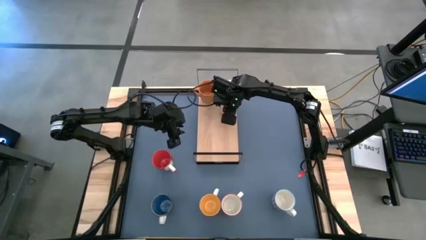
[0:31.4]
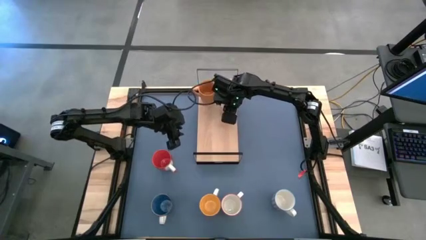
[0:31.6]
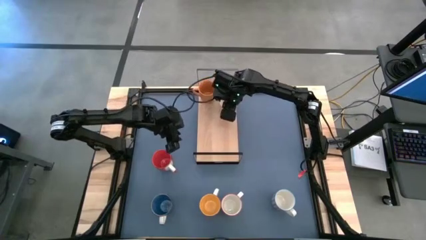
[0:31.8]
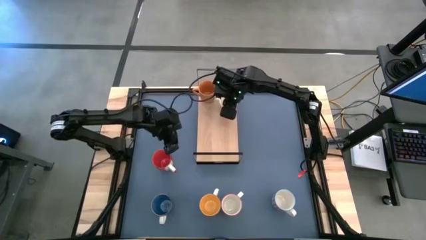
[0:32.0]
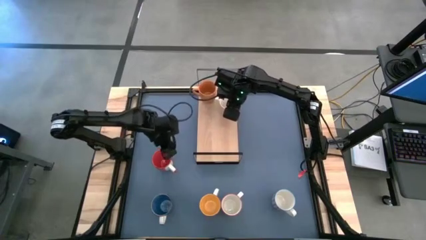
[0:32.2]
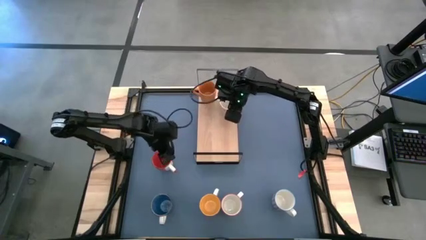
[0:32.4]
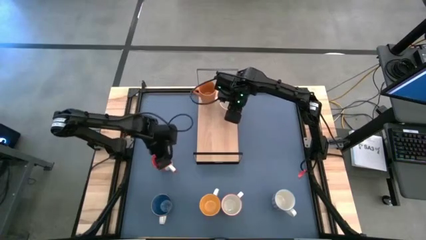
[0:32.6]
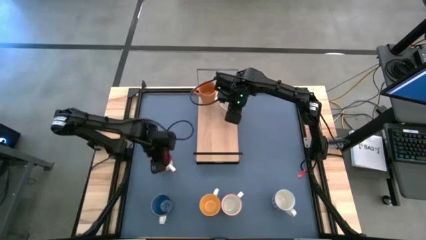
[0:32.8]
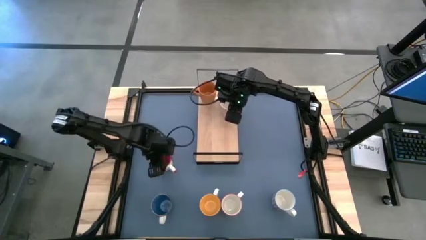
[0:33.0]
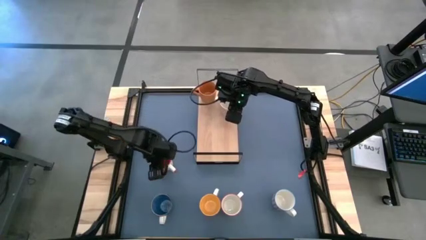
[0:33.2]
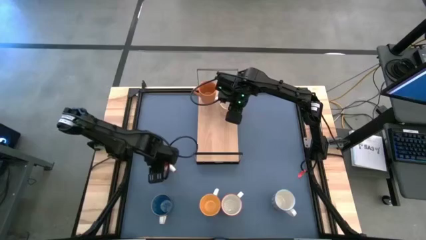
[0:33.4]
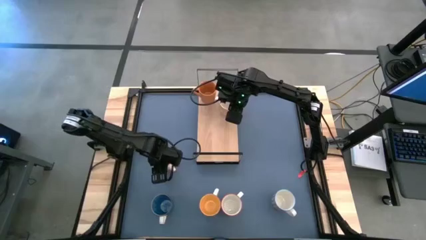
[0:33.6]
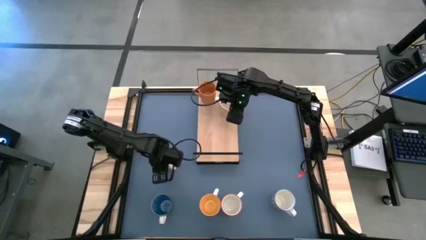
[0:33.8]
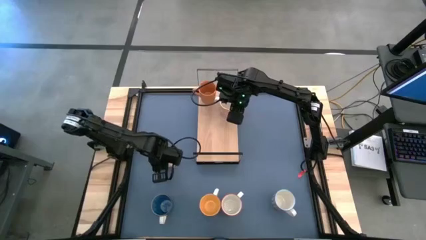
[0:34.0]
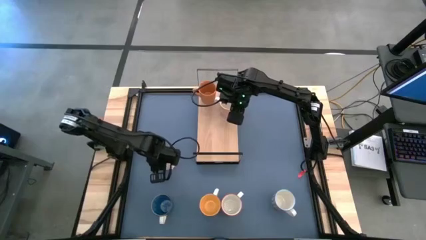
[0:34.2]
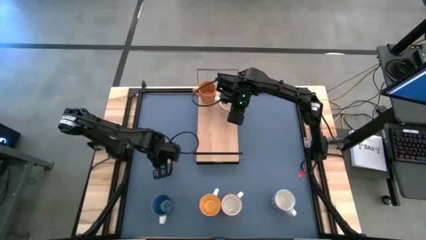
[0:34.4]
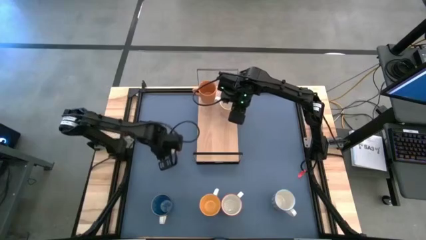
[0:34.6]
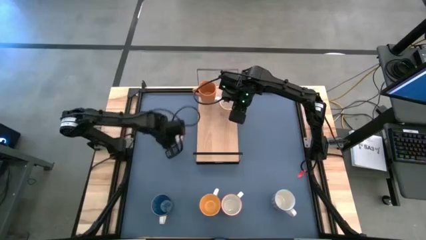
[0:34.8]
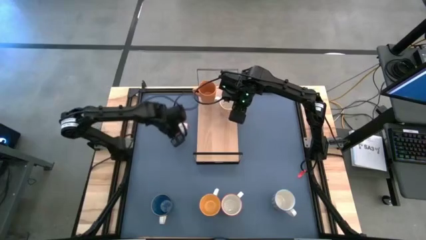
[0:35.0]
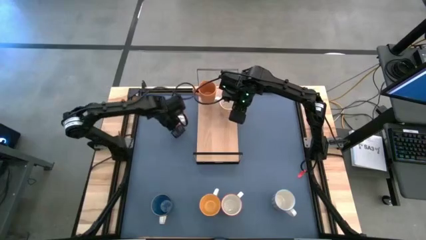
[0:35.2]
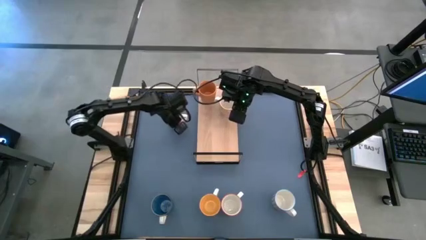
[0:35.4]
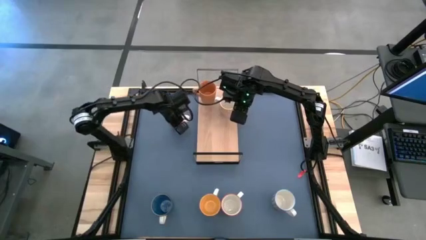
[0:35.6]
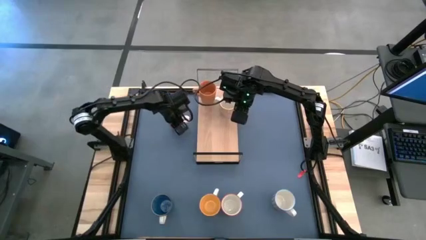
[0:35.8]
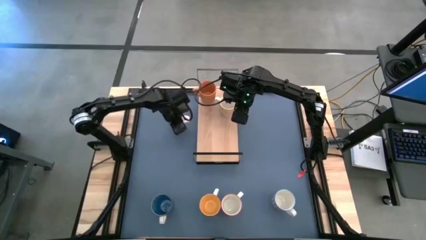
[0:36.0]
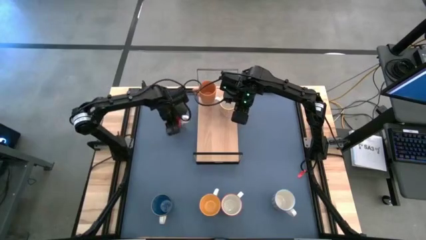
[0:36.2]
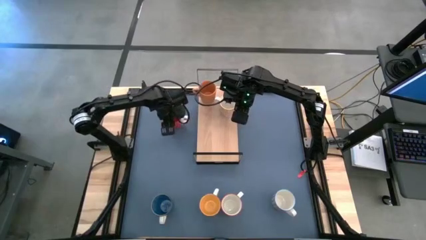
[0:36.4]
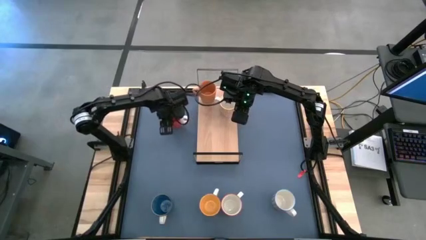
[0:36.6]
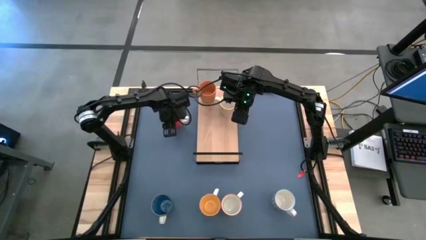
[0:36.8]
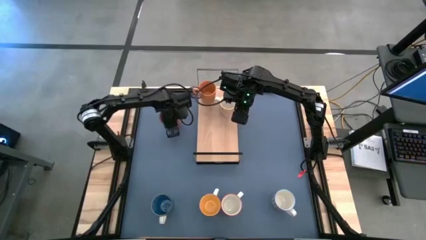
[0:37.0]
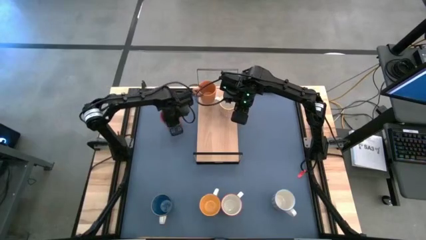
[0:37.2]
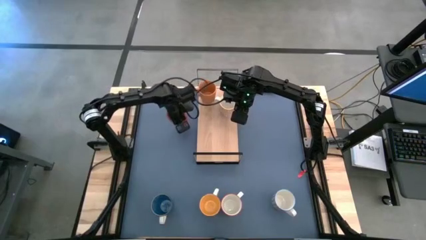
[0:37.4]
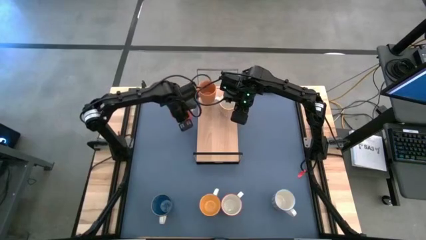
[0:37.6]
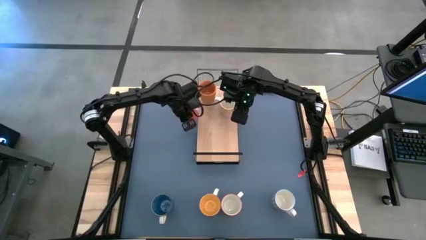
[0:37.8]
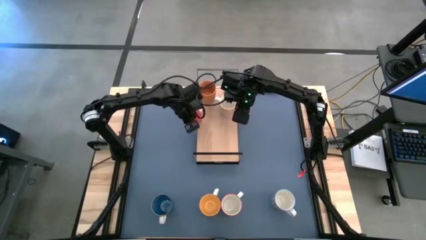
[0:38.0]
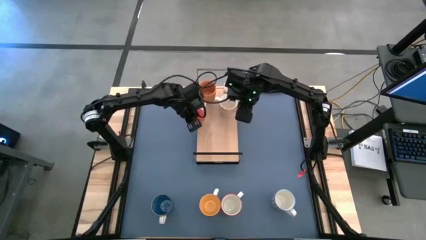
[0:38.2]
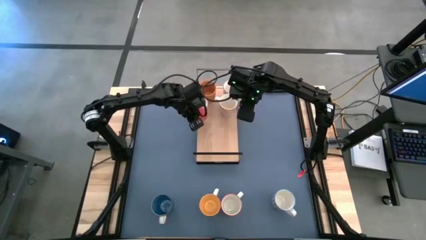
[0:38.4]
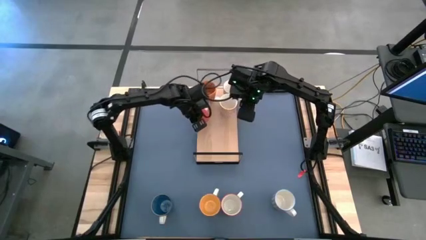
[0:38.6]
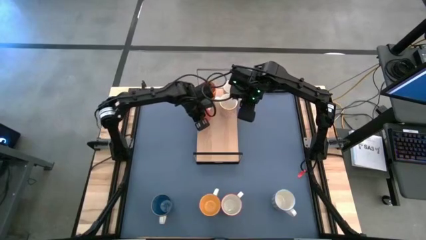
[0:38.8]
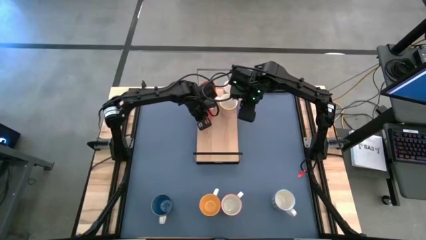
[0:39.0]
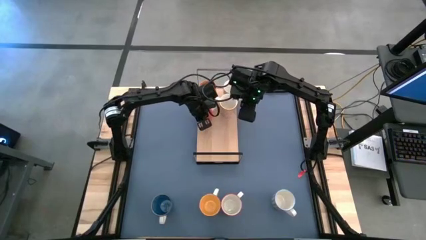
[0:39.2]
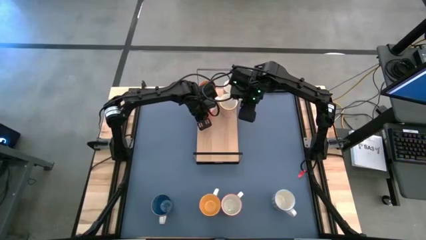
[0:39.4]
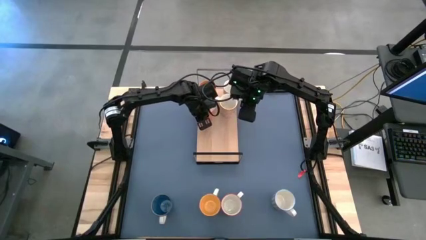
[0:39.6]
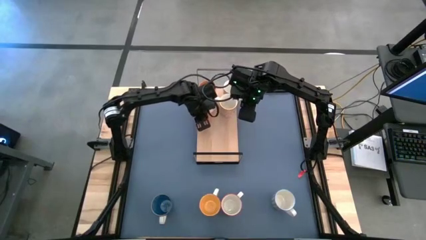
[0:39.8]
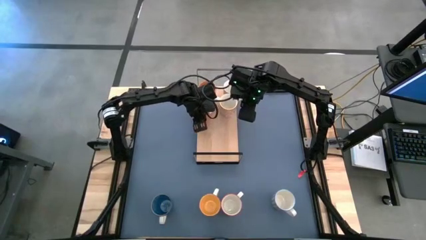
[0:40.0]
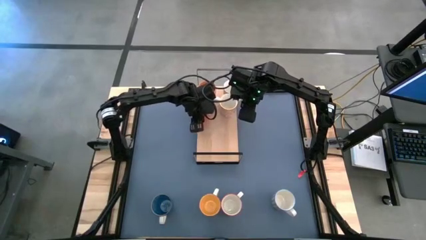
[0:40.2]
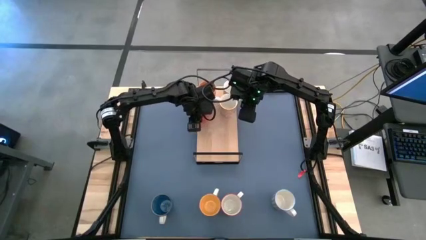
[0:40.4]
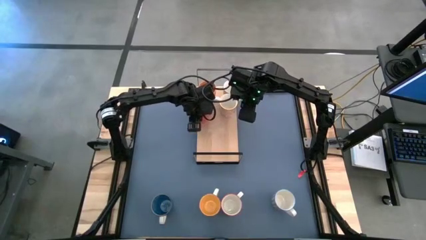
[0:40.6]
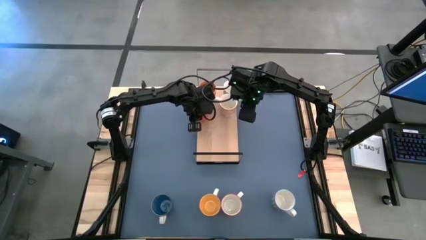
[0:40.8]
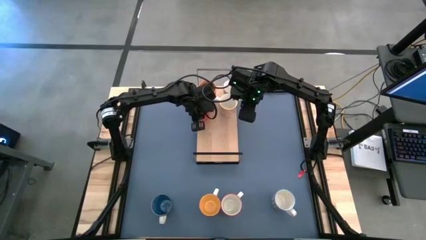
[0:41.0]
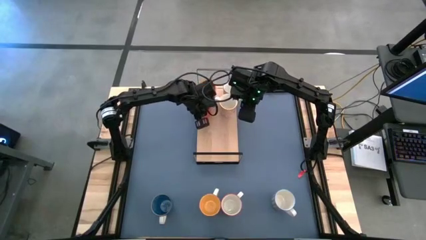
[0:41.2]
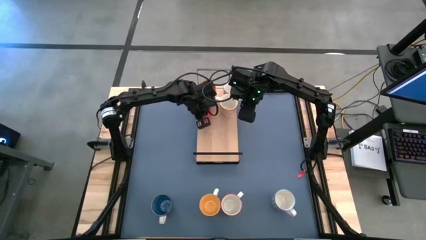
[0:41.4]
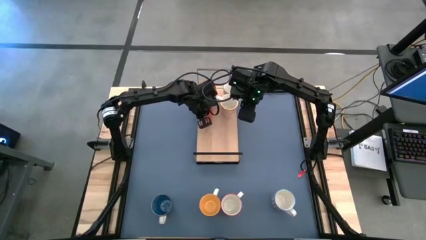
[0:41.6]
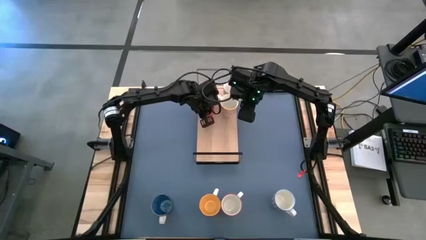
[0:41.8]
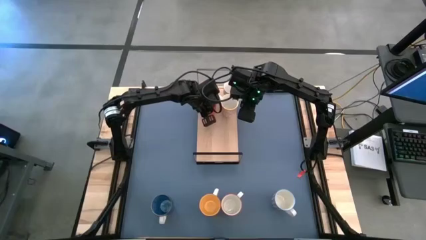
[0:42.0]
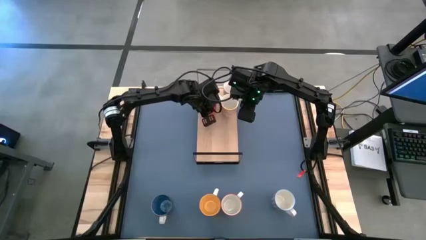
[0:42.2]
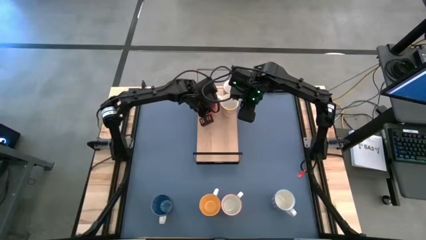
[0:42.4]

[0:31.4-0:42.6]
Task: Place coffee mugs
Put the red mug on the shelf

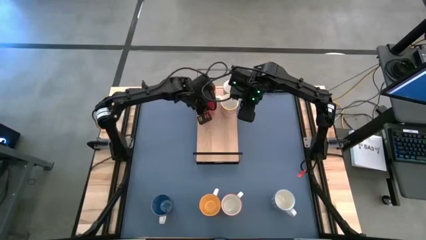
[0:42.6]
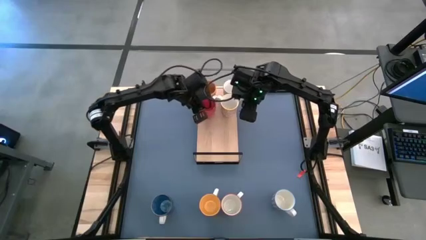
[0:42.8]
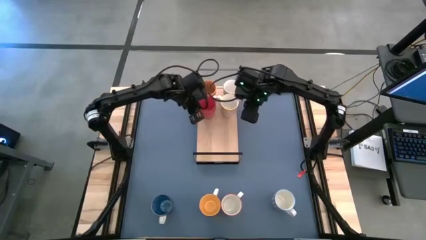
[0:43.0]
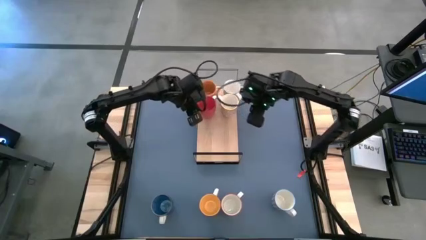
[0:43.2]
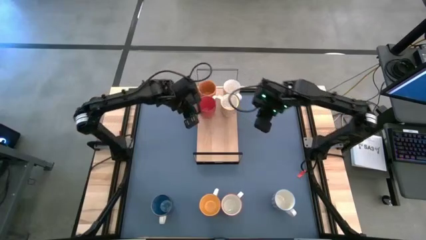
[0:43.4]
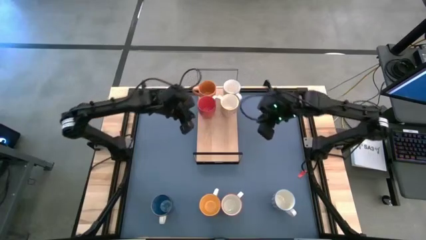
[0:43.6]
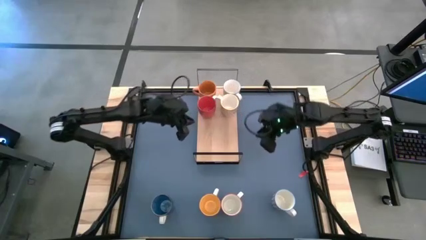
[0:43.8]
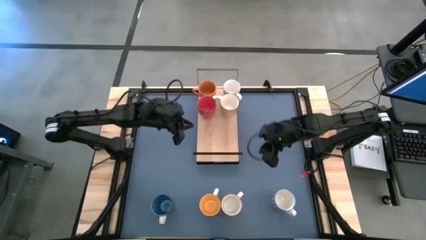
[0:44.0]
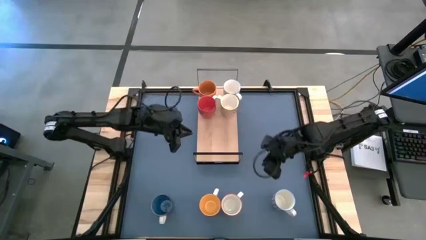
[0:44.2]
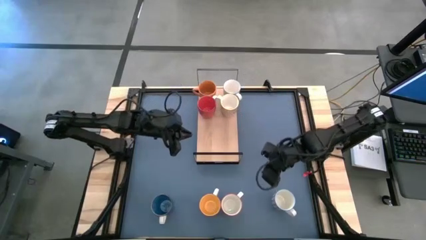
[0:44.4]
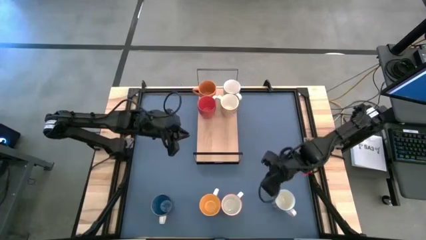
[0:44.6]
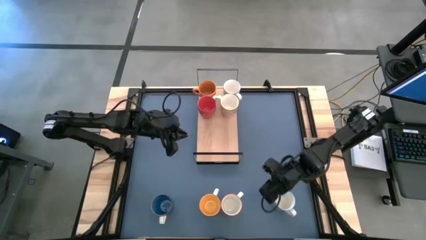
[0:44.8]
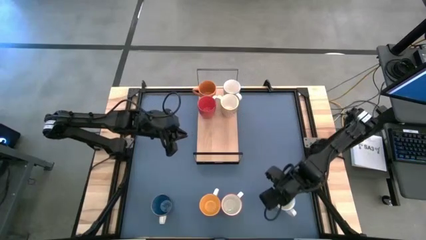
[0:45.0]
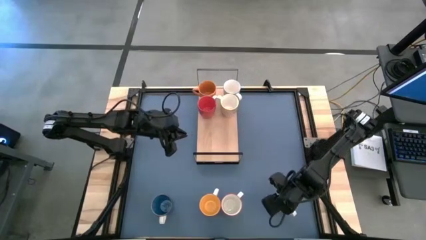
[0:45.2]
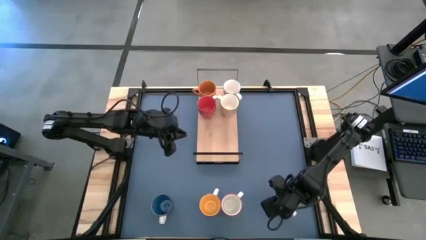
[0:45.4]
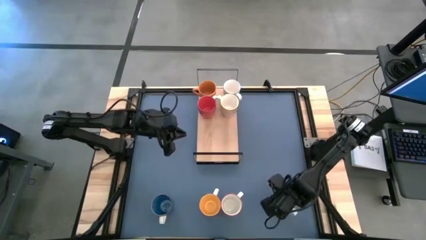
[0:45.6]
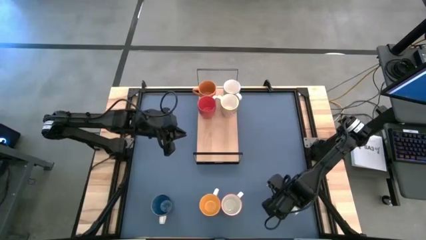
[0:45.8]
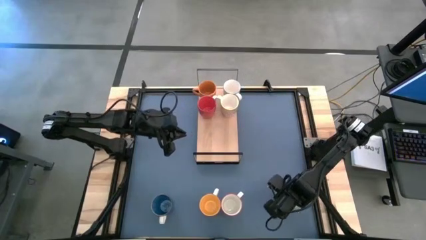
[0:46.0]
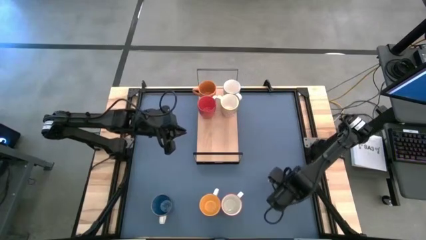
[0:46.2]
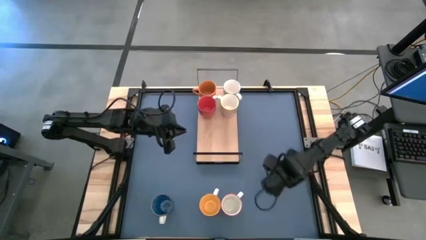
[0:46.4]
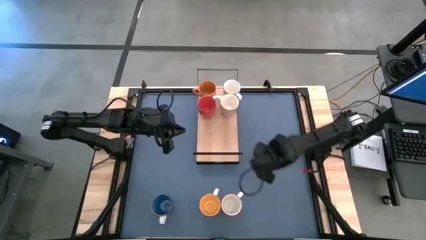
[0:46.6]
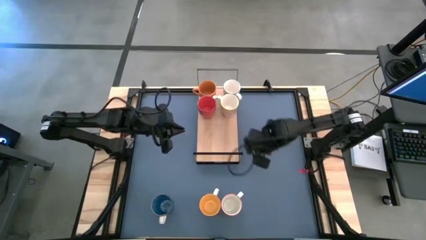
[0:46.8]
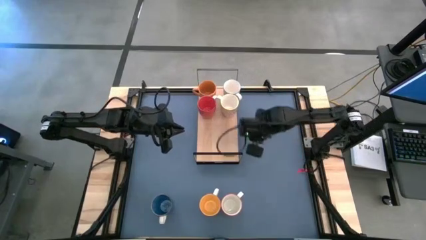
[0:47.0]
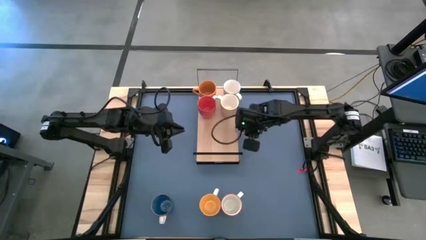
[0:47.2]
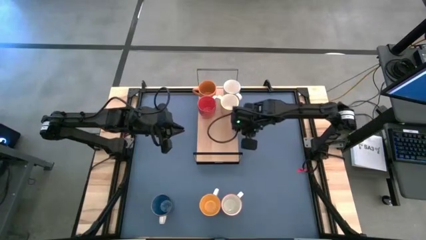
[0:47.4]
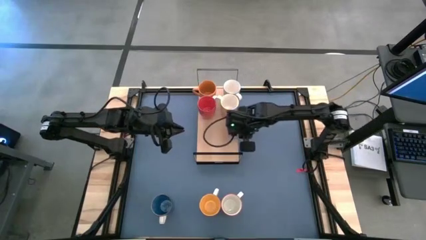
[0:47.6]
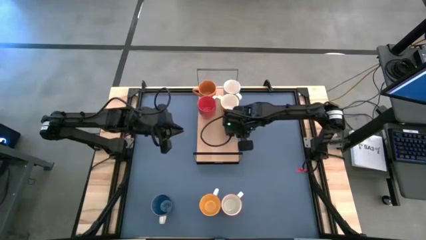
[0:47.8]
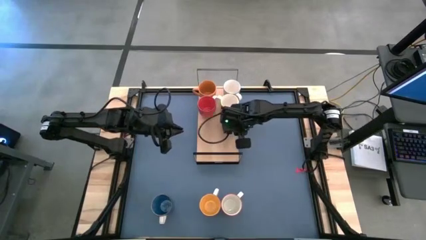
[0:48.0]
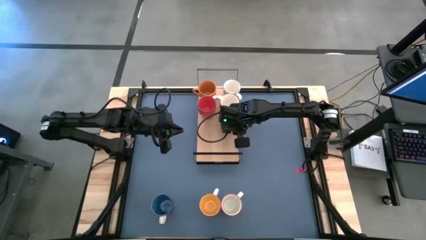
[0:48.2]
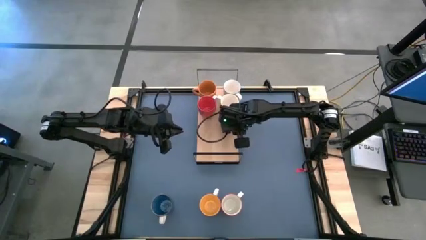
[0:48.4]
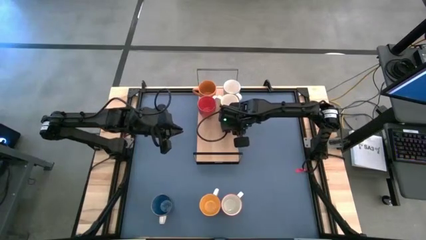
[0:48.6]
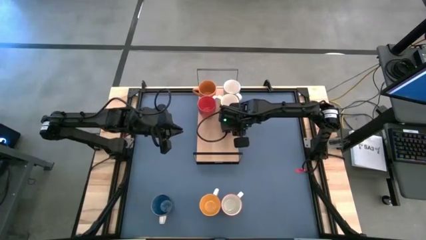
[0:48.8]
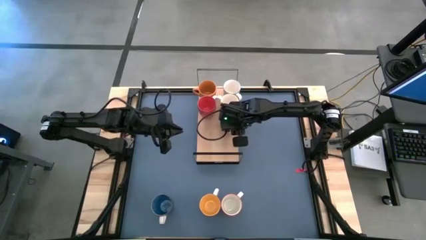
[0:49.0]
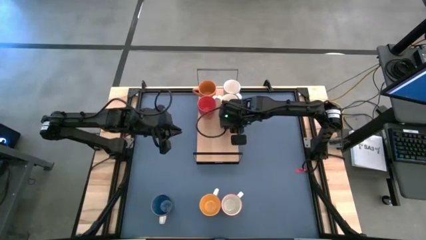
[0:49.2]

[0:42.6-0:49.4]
Put the red patterned mug on the shelf
